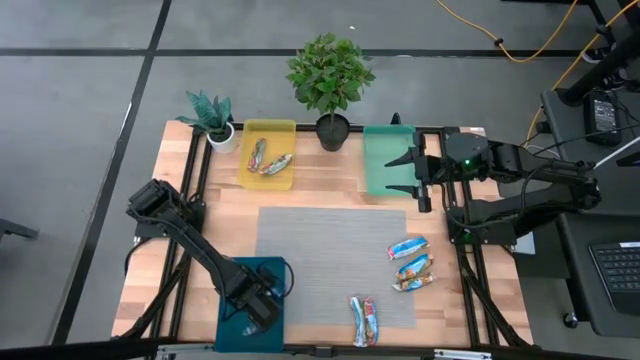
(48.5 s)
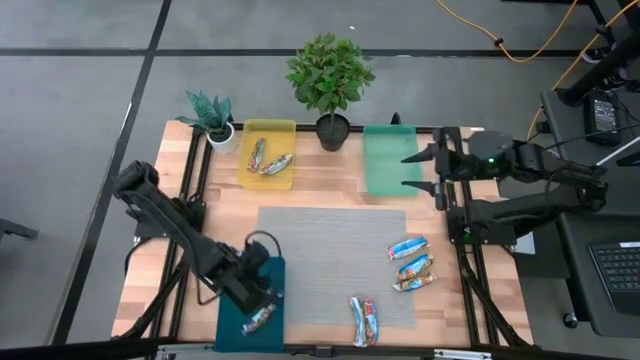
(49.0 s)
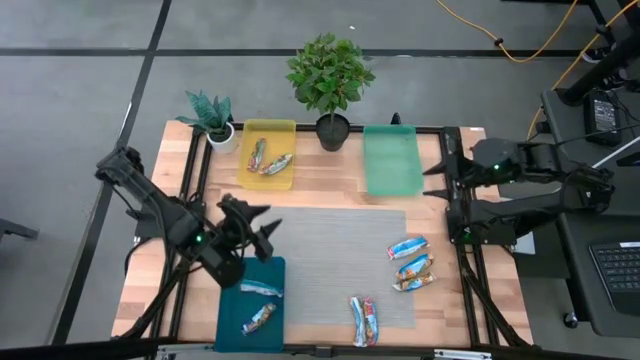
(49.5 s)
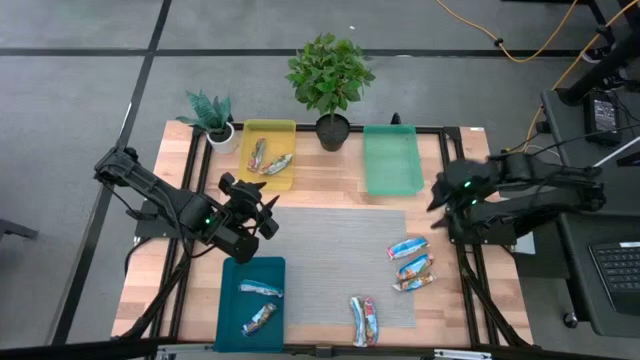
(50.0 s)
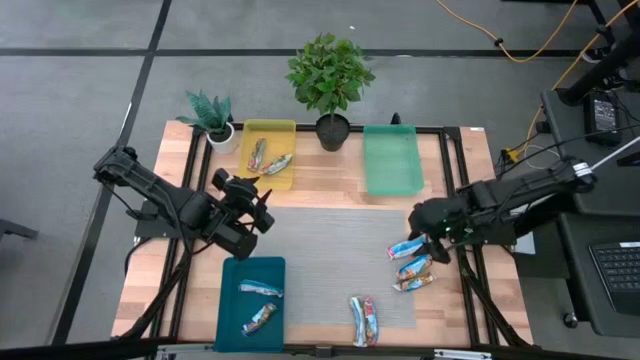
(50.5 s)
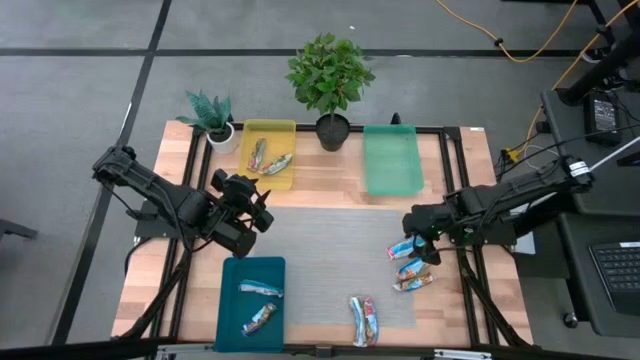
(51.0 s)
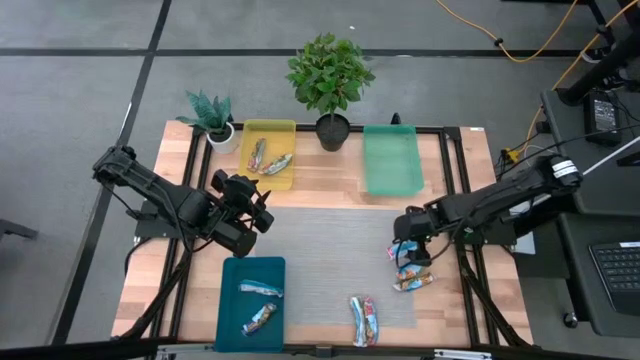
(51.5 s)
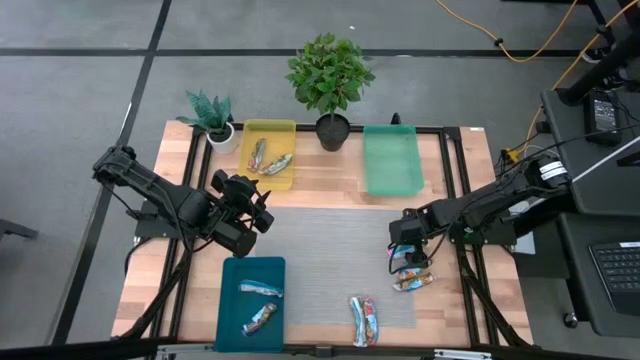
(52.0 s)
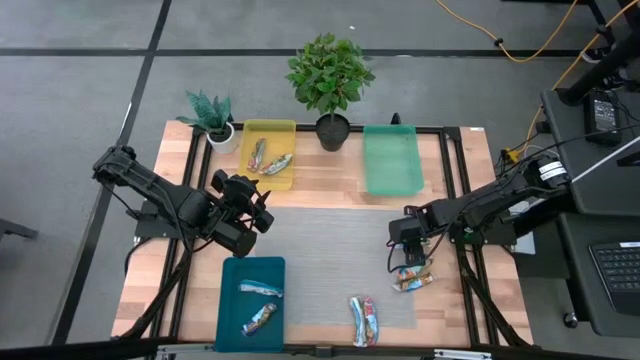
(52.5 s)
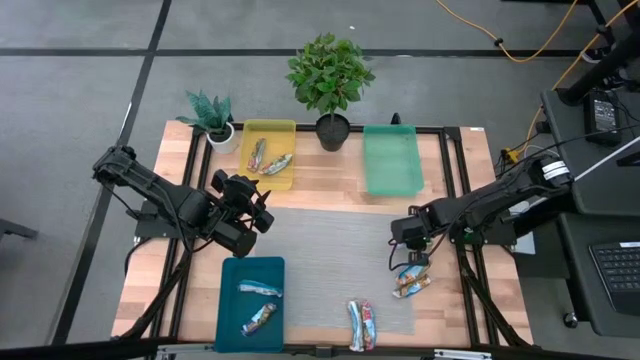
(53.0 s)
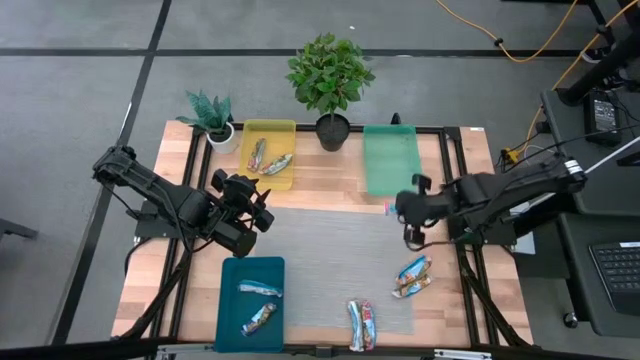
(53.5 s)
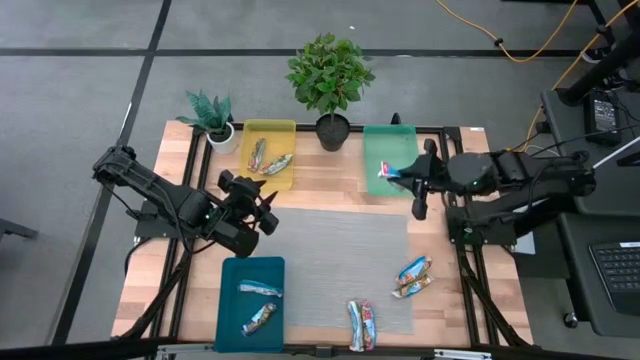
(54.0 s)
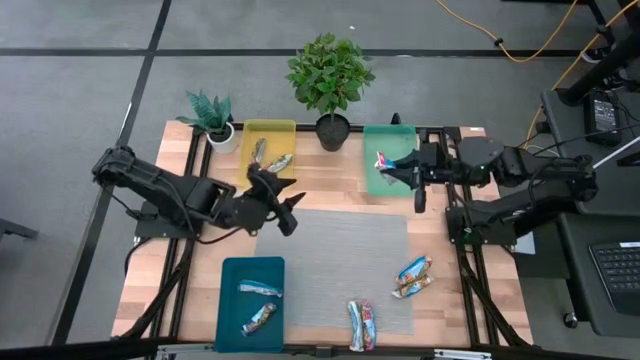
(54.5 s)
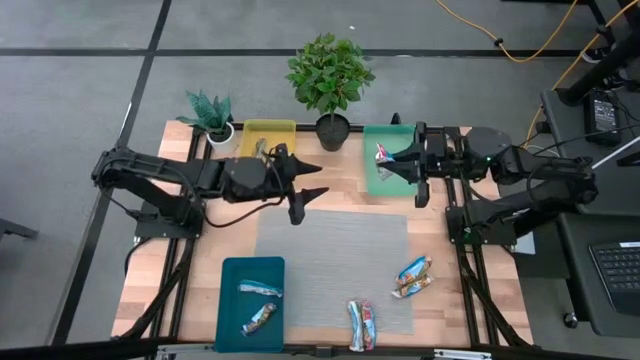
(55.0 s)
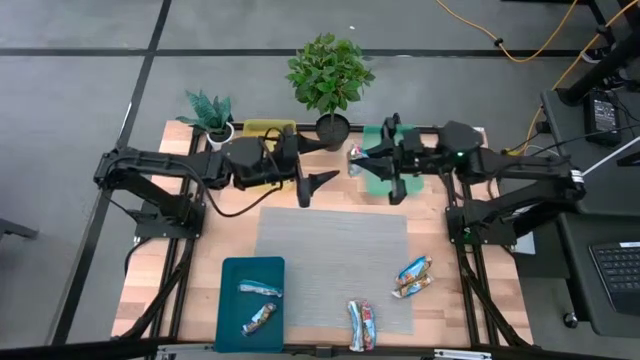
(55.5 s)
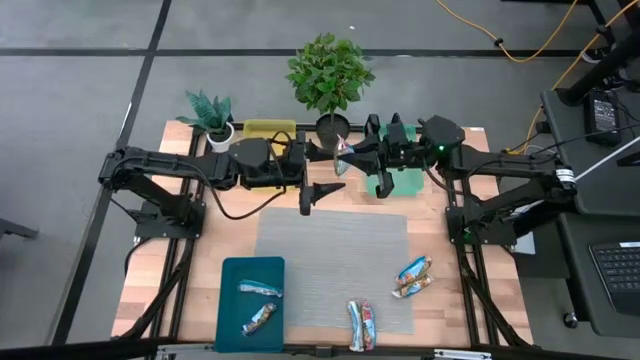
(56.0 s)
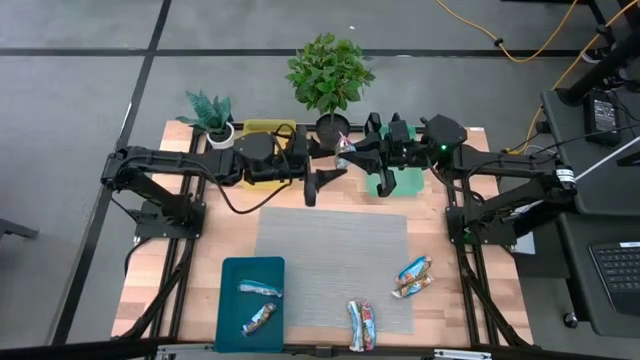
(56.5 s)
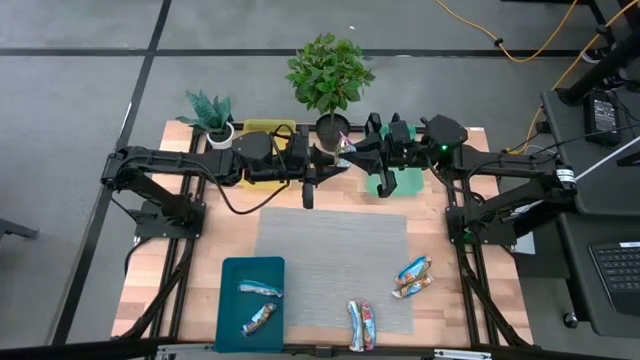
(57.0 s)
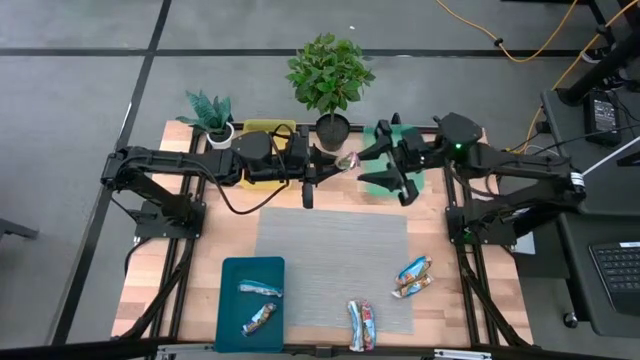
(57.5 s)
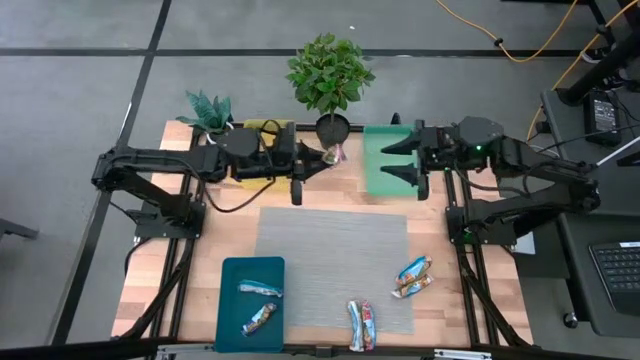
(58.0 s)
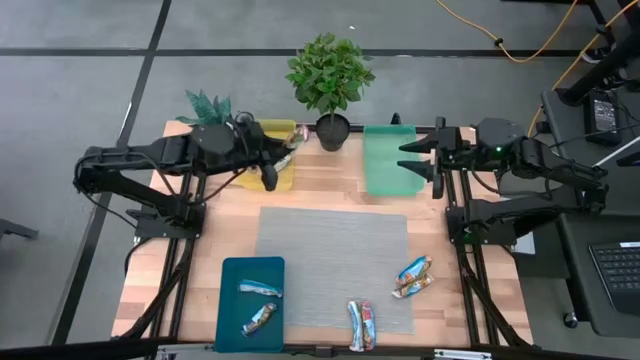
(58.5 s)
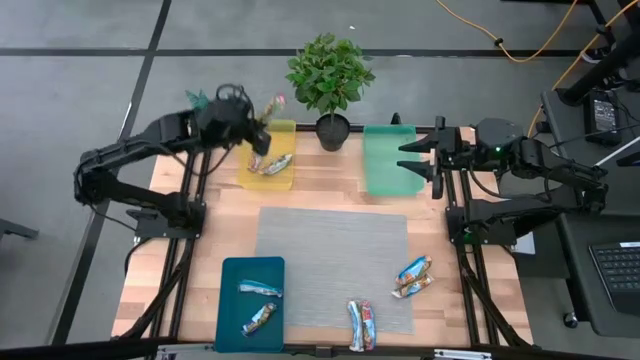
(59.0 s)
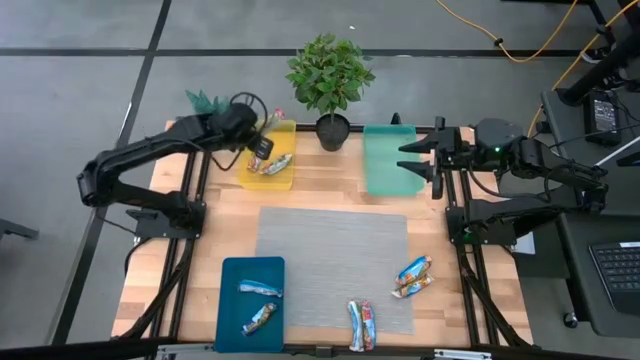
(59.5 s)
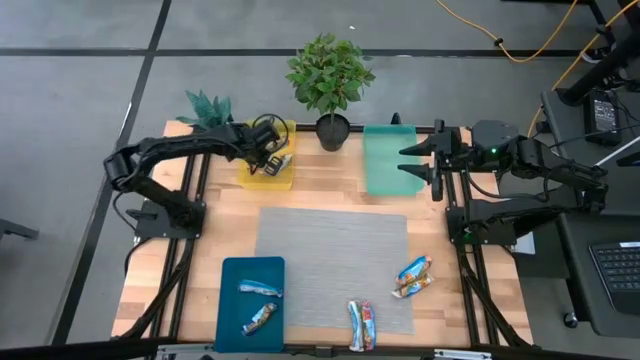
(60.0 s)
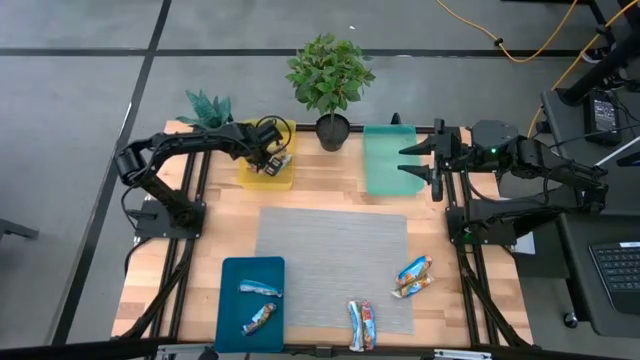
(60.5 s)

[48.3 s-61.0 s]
Task: Pick and place Granola Bars by type
Put the red granola bar into the yellow transparent bin

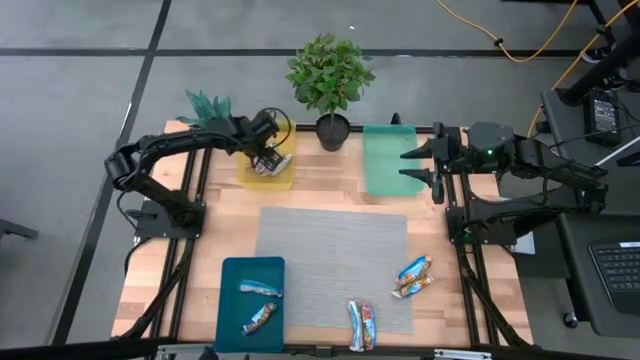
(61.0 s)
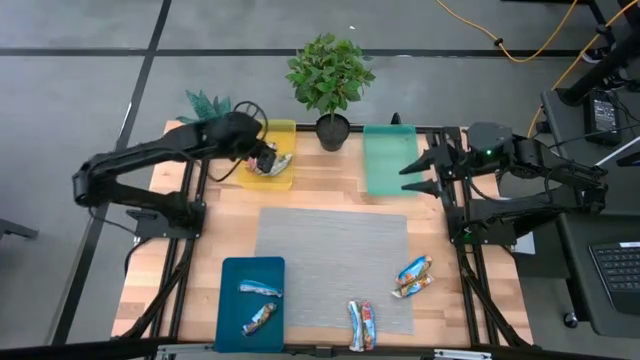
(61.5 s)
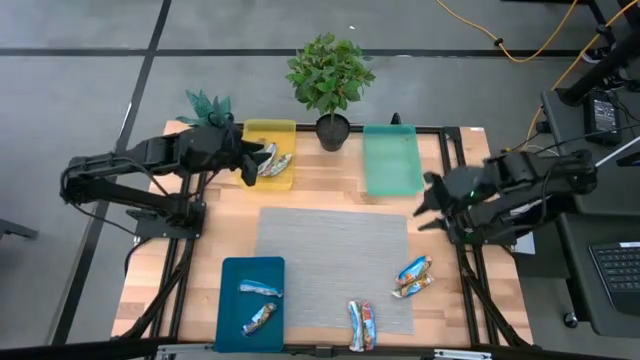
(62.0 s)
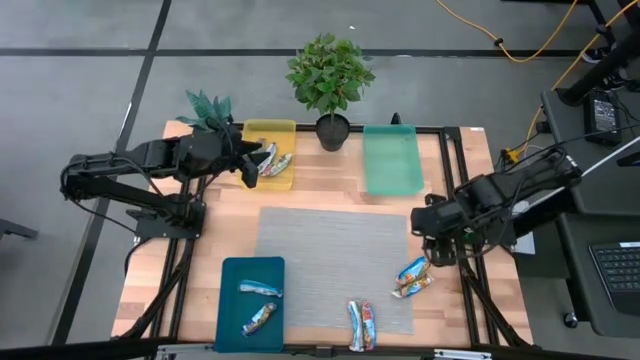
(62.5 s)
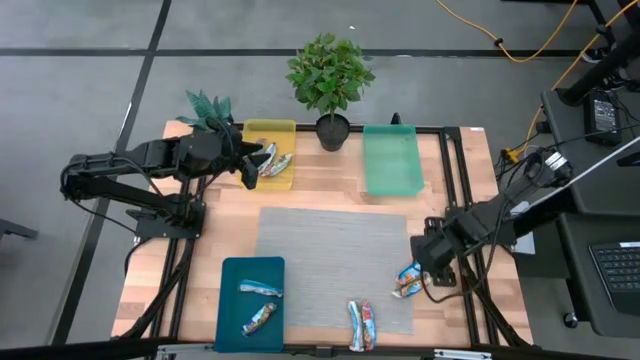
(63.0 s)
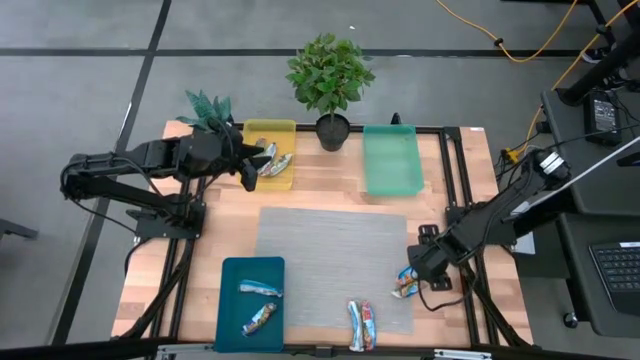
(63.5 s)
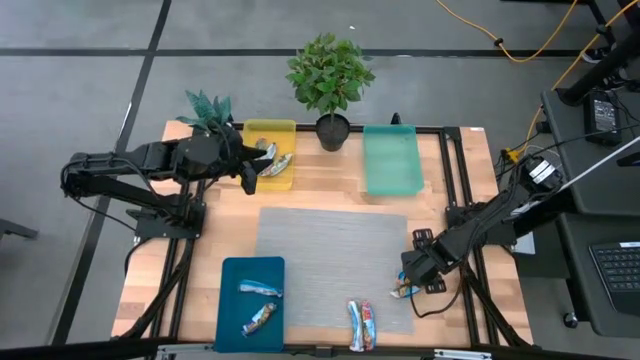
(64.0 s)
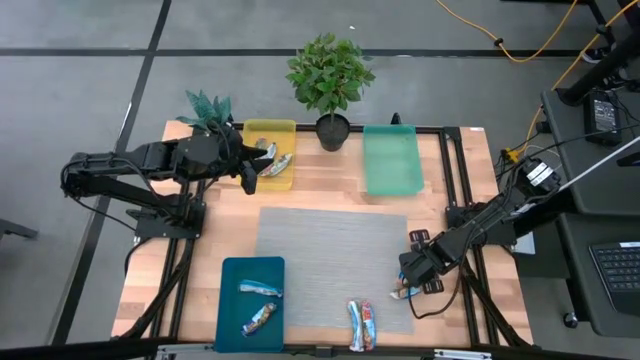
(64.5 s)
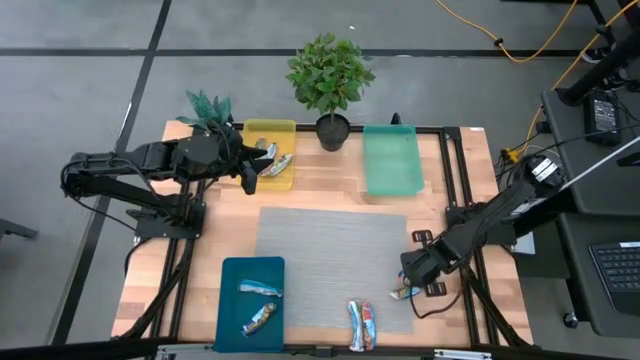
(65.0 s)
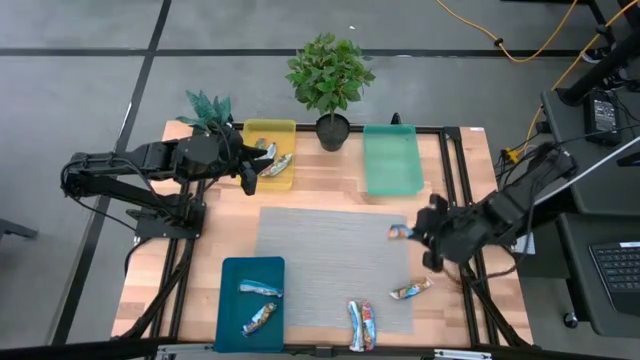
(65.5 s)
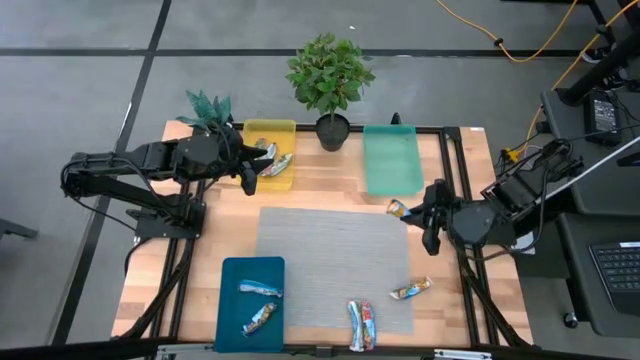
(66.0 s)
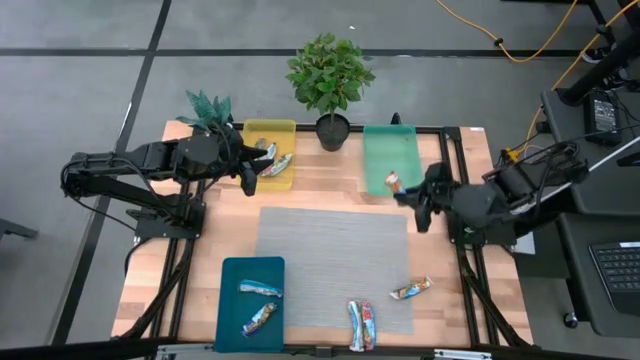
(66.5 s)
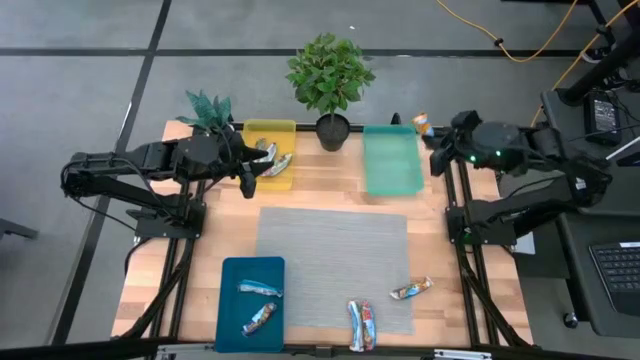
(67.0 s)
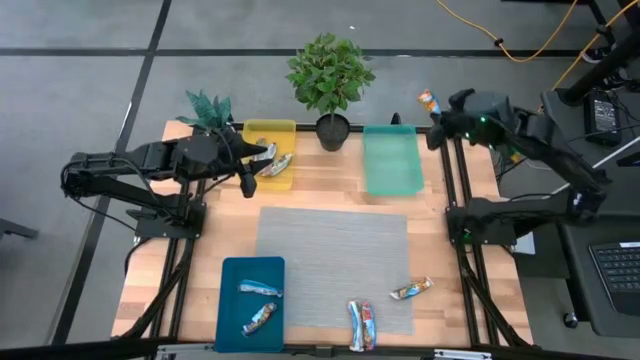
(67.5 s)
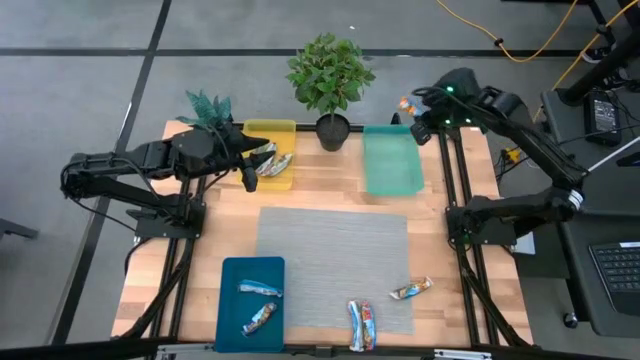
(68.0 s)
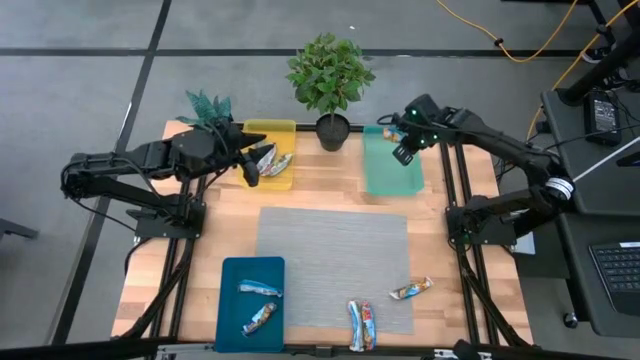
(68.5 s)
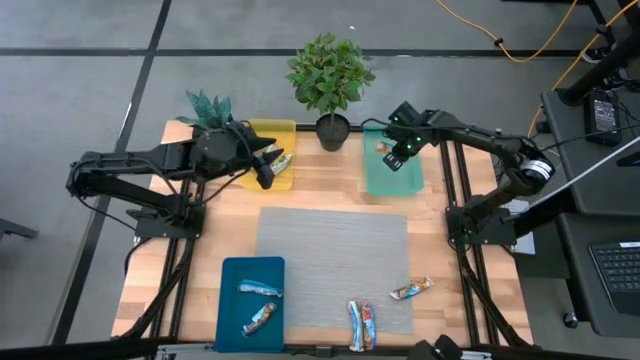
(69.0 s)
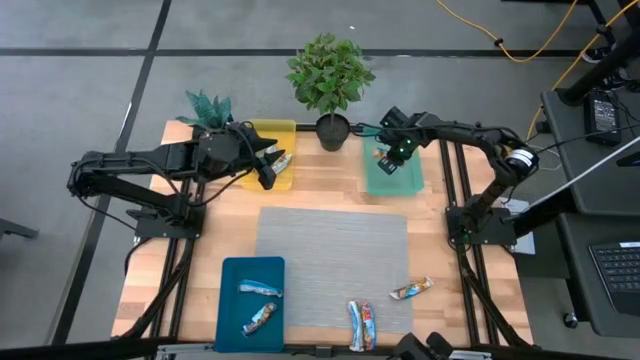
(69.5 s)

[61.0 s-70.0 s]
Put the yellow granola bar into the blue transparent bin
